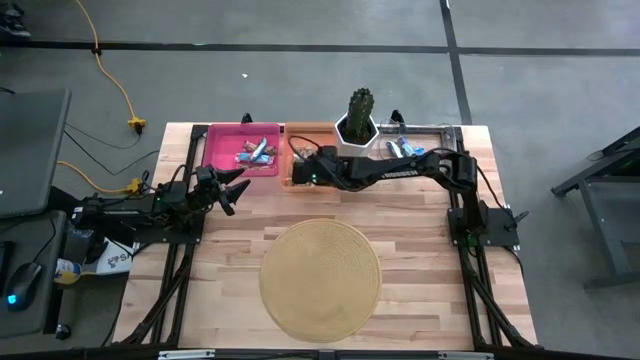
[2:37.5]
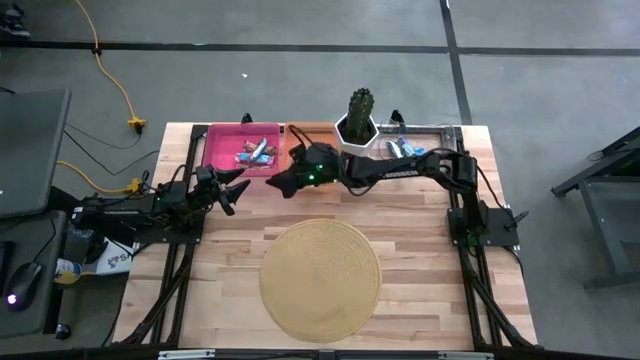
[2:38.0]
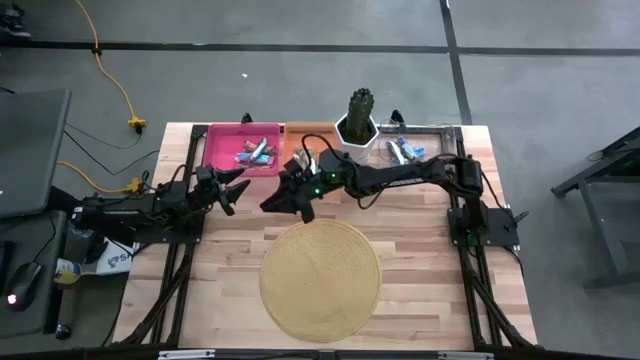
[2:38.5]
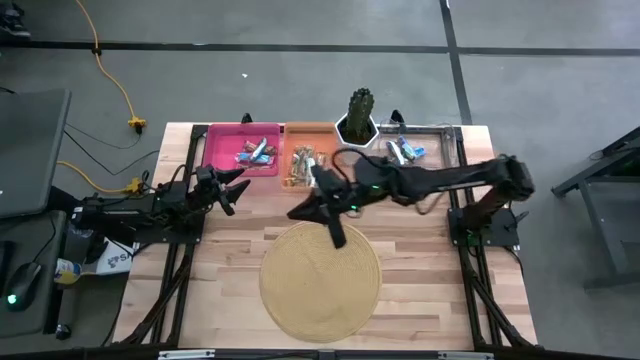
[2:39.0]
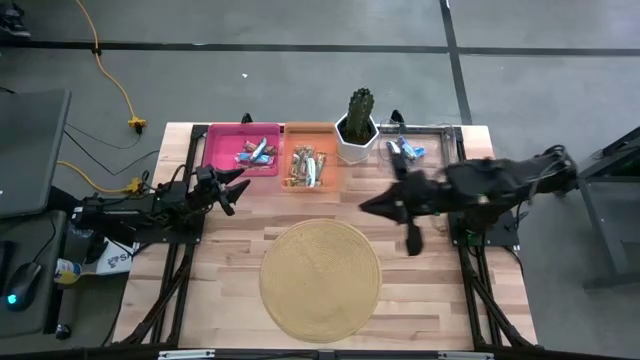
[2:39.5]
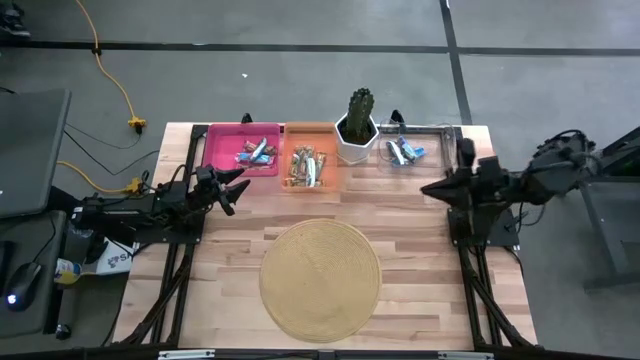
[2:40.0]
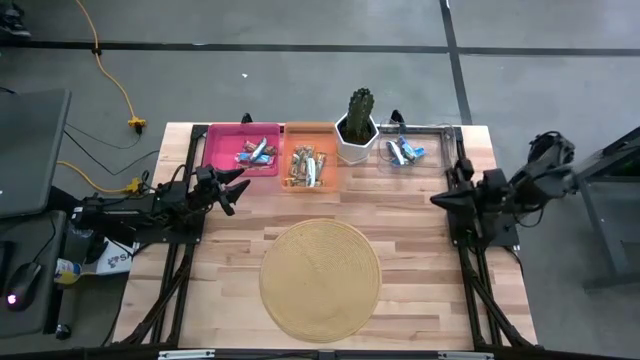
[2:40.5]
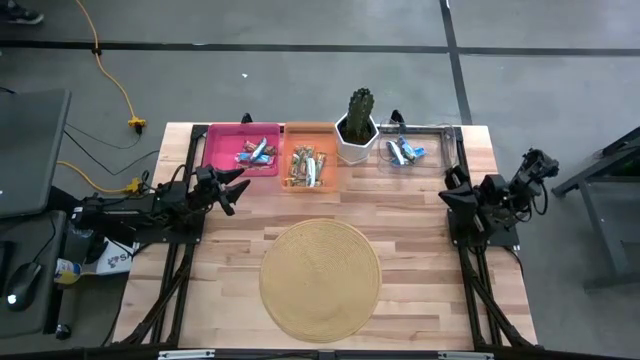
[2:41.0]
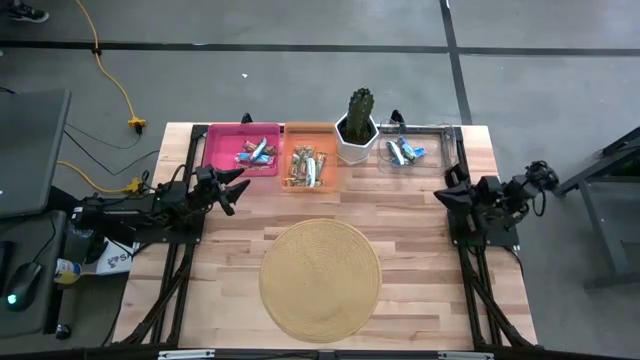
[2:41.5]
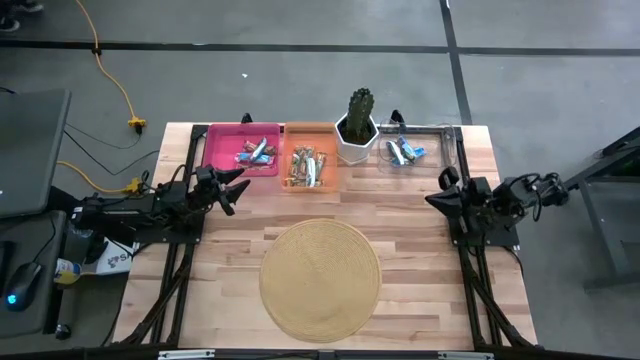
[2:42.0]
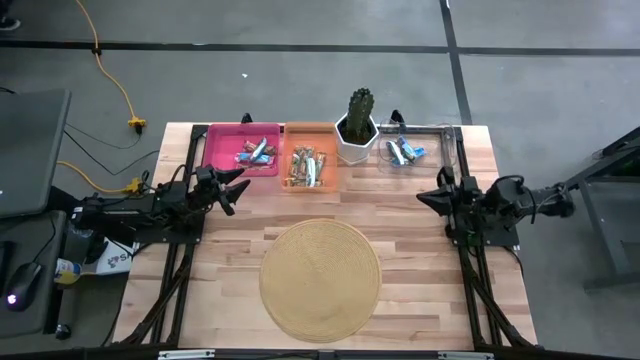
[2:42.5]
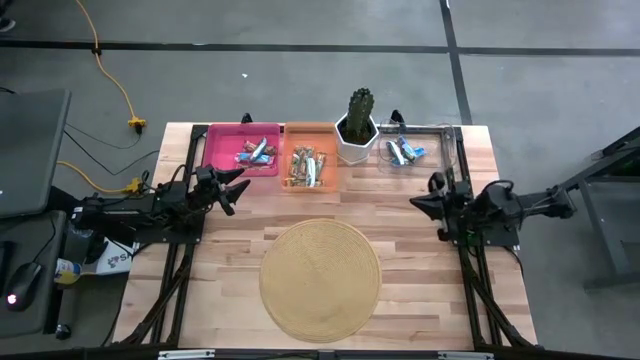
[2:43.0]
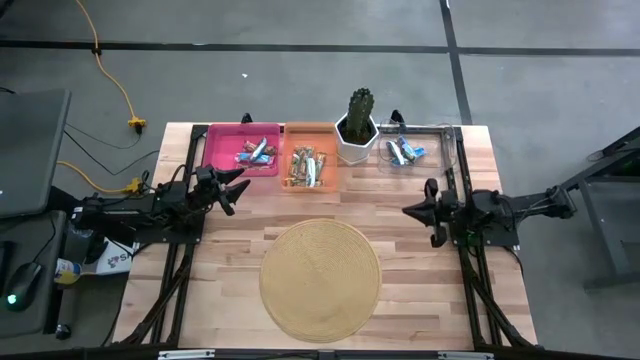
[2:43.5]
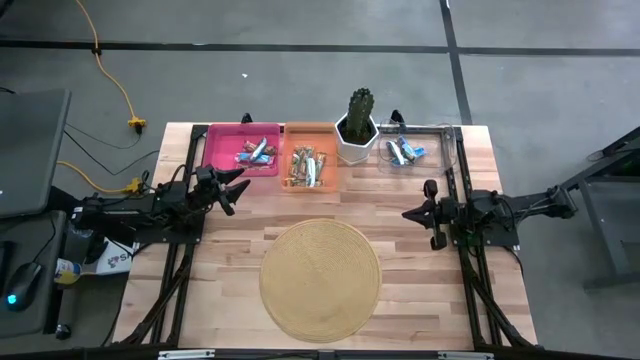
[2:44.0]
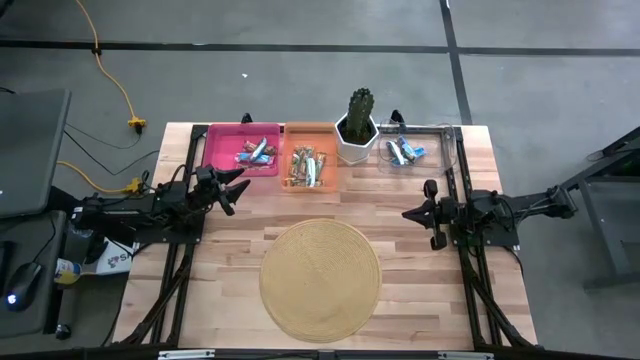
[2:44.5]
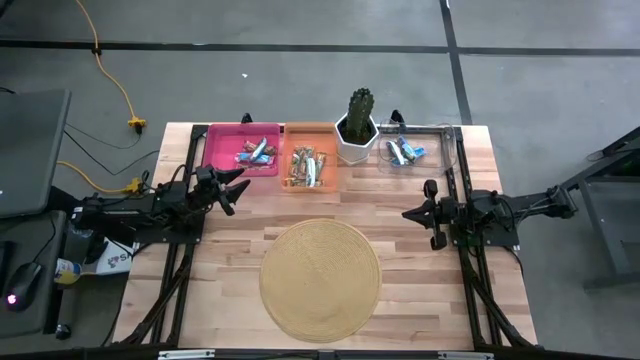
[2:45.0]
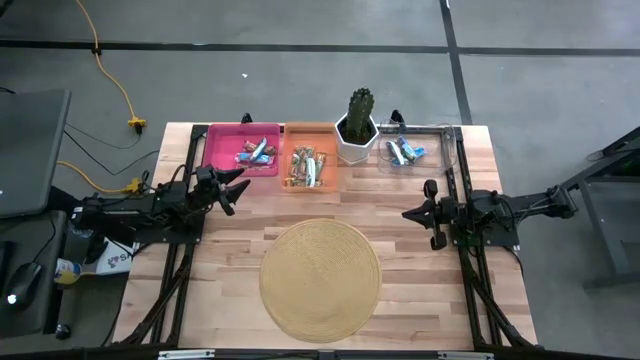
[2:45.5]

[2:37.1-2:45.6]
Task: Pick and place Granola Bars by type
Return to Home Position

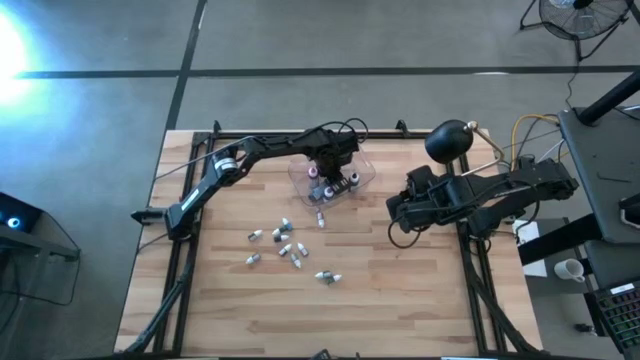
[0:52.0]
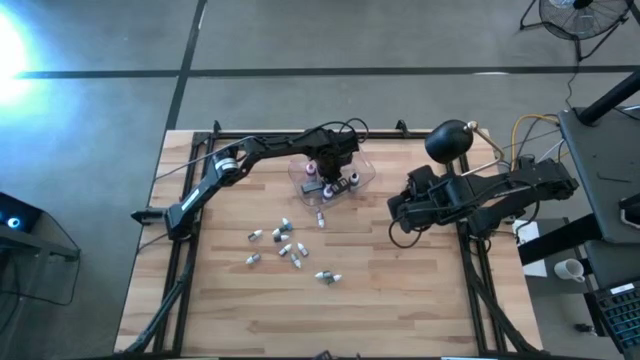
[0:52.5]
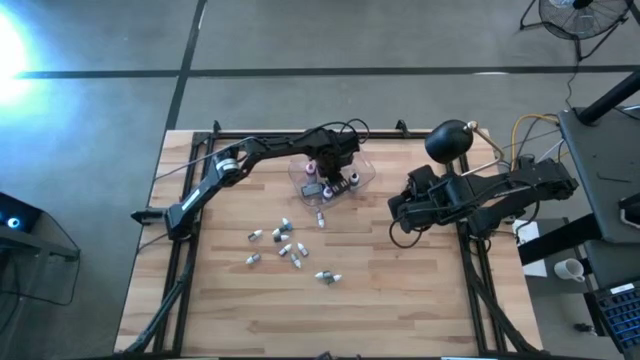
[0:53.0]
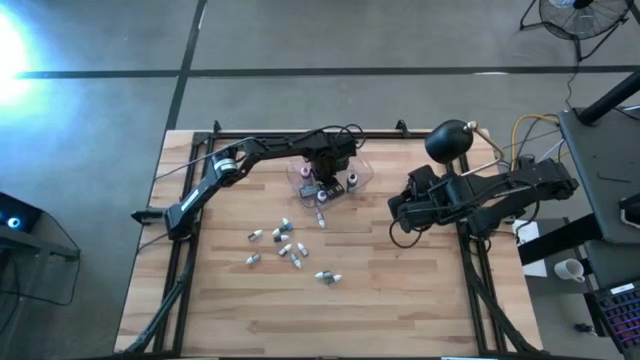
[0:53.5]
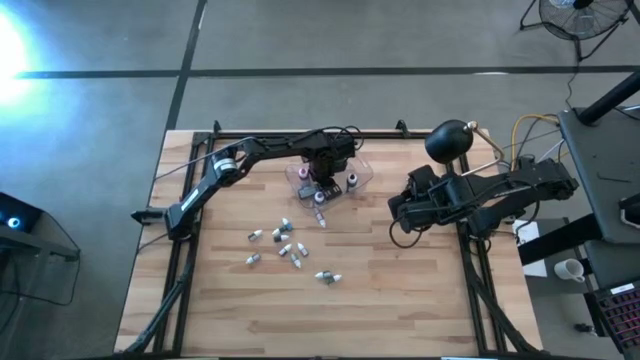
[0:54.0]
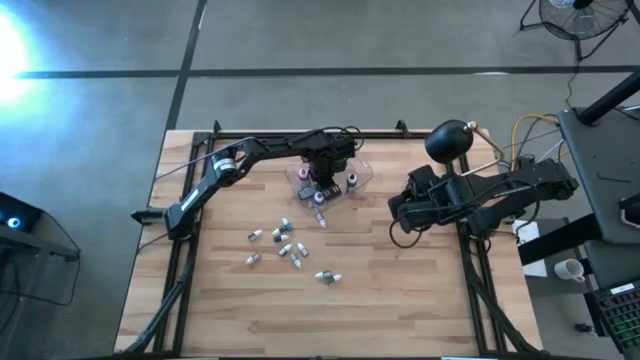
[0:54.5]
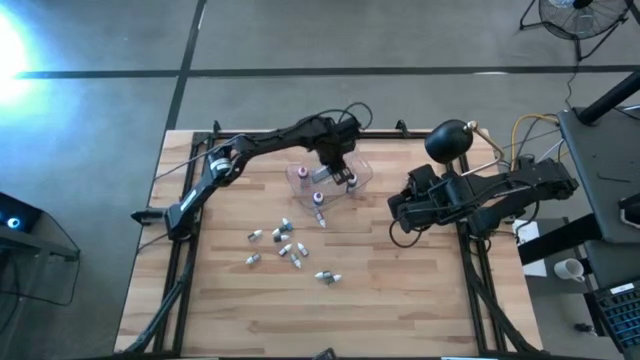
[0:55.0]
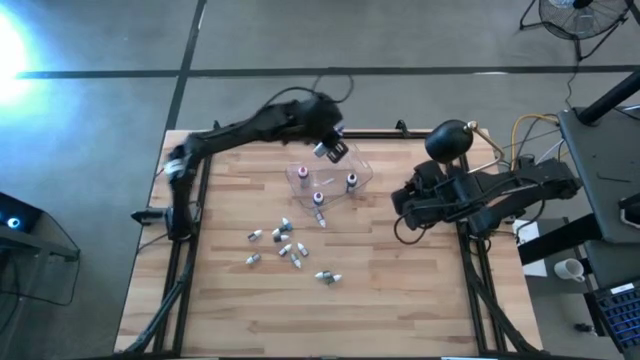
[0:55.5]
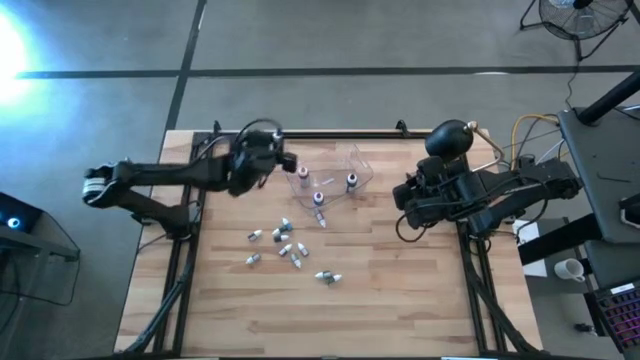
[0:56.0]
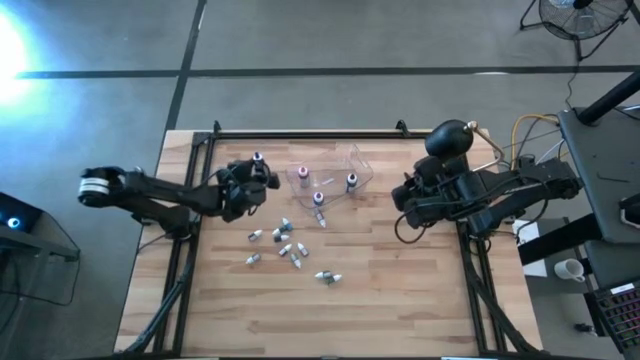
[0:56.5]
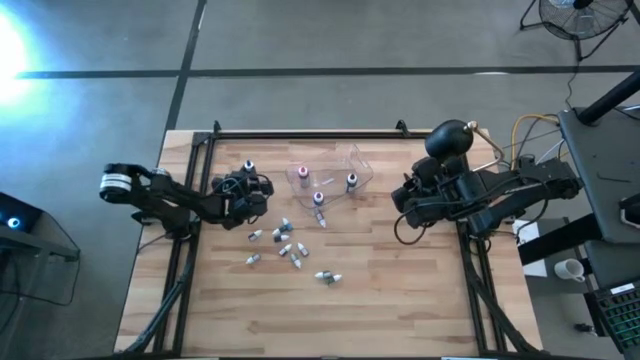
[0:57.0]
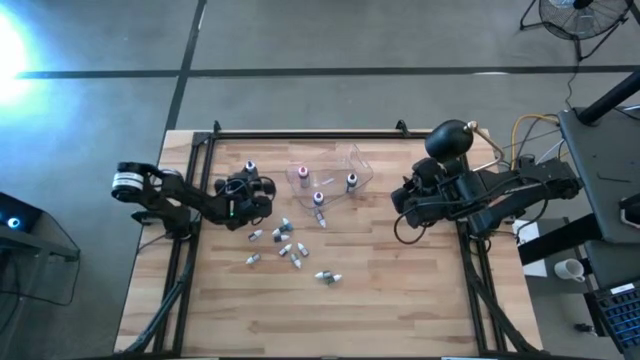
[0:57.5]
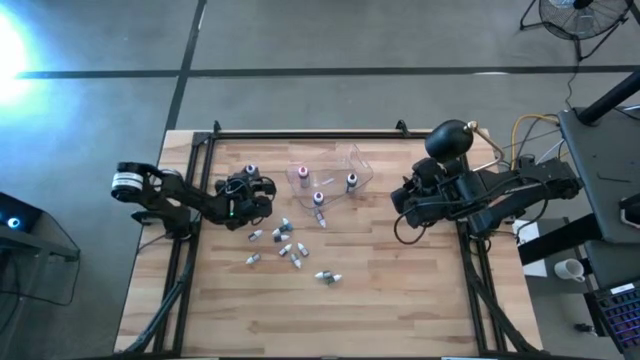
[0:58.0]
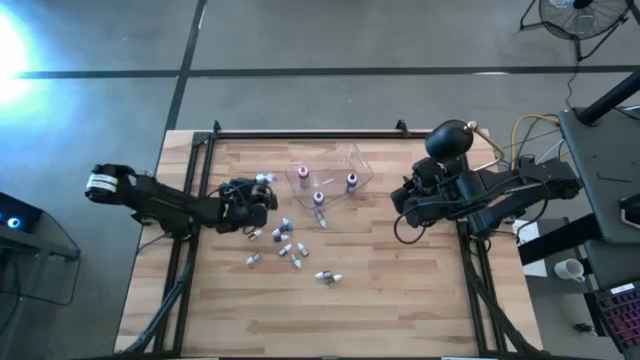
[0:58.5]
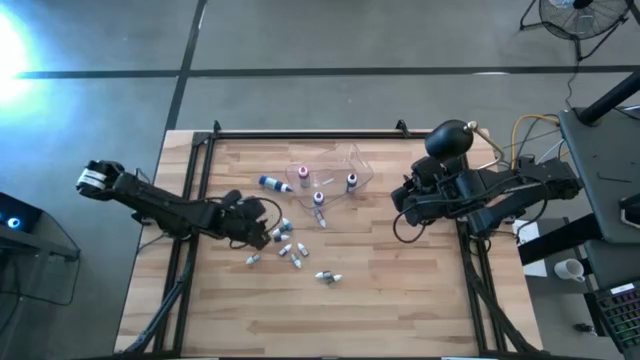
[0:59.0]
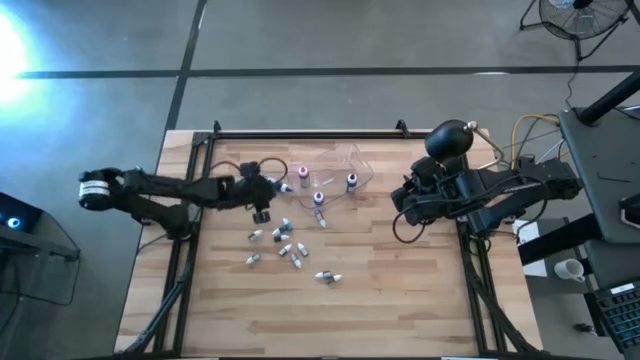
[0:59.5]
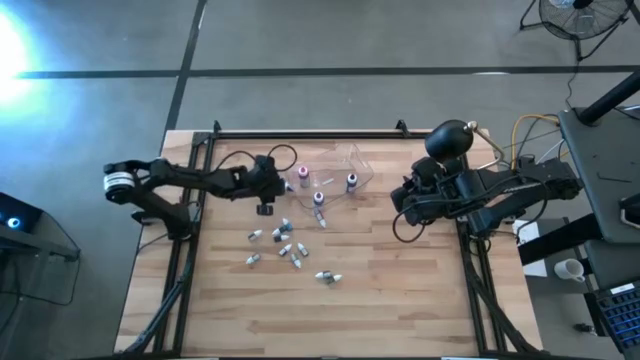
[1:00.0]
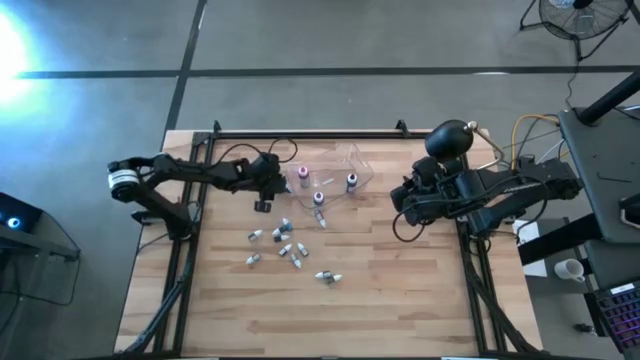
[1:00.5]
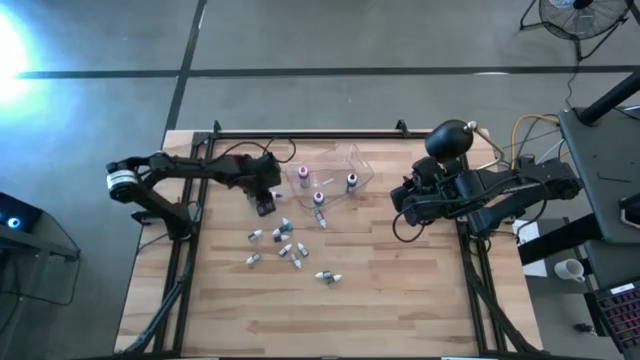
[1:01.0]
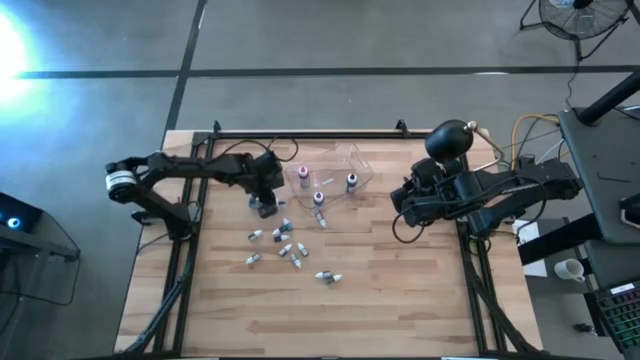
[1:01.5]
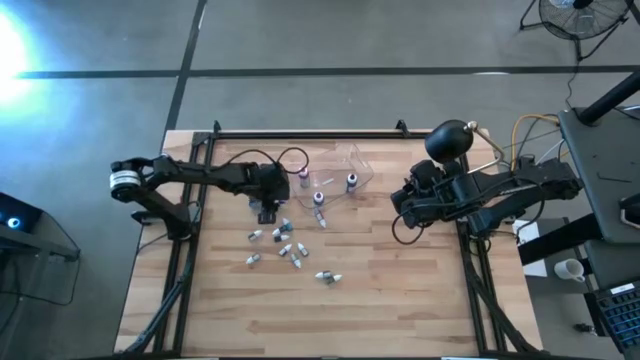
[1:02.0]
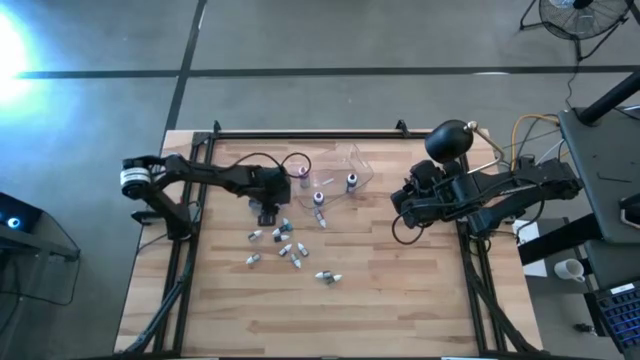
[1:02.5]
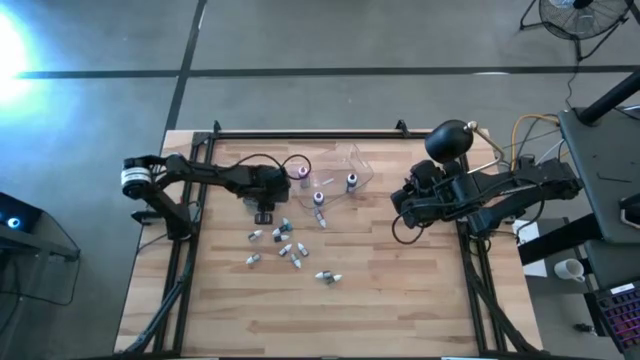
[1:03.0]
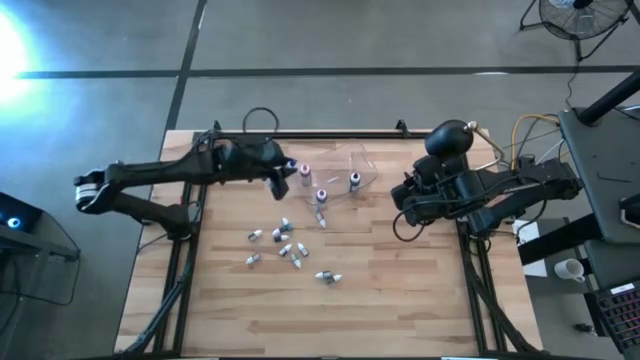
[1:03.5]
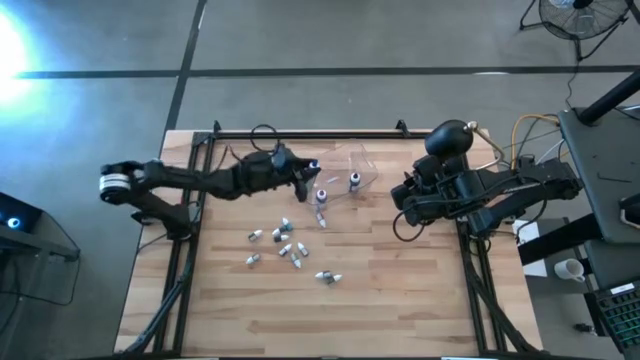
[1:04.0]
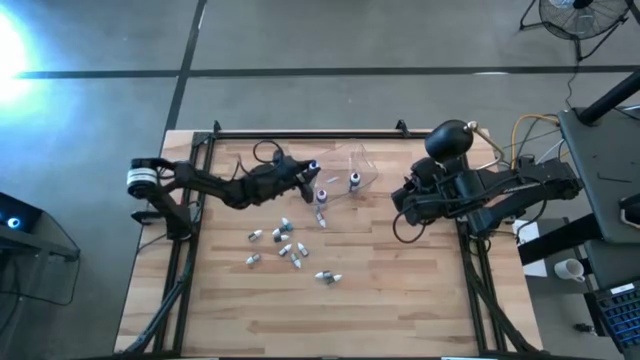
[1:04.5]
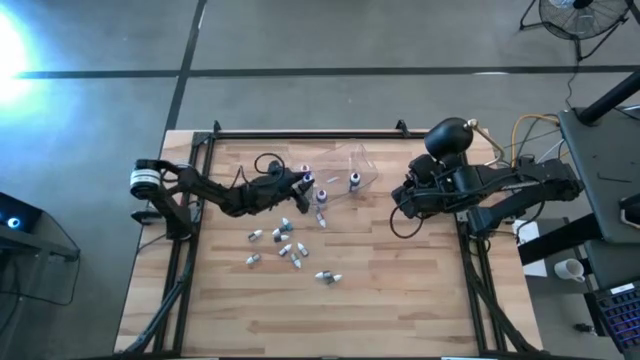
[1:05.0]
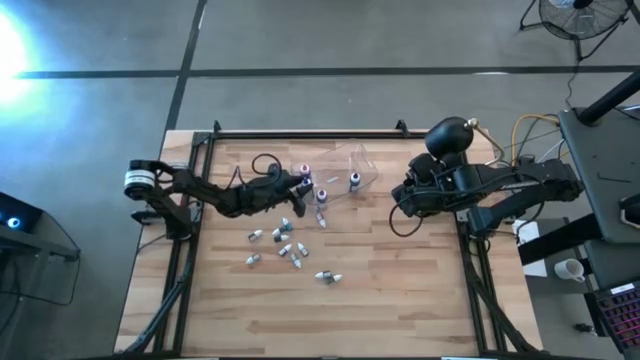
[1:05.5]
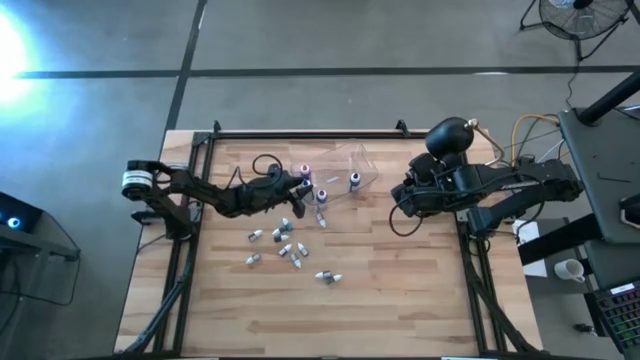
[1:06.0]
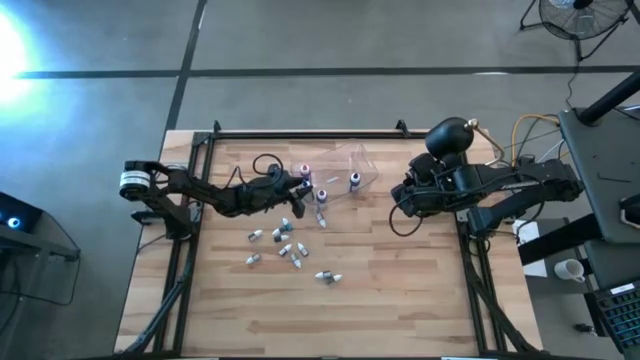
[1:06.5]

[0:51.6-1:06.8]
Task: Pick & Place food coloring
Put the large blue food coloring bottle into the transparent bin
